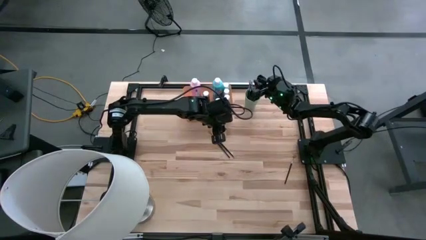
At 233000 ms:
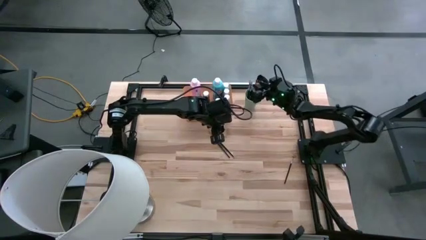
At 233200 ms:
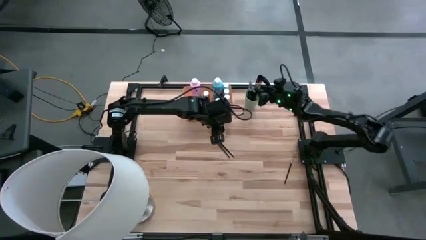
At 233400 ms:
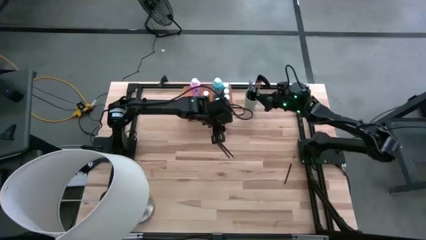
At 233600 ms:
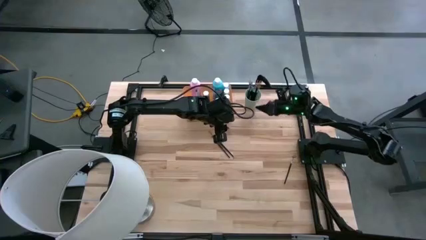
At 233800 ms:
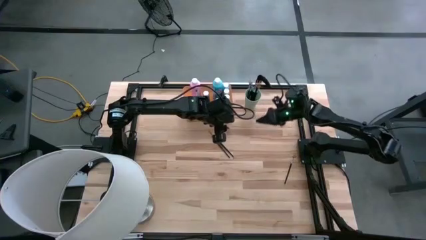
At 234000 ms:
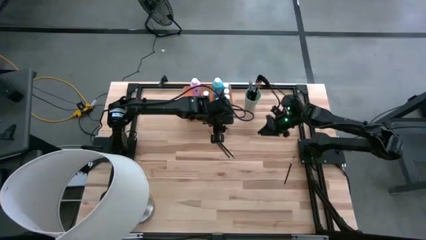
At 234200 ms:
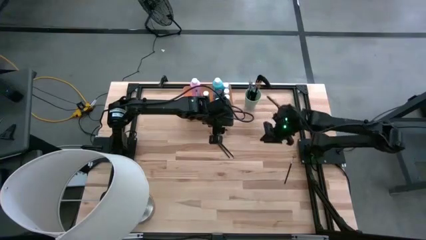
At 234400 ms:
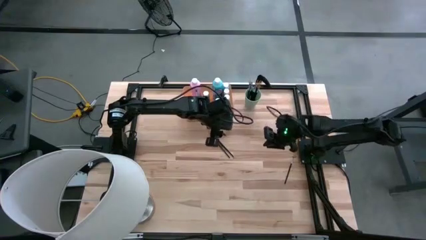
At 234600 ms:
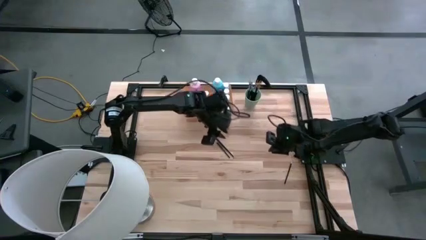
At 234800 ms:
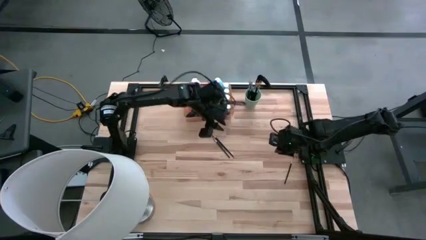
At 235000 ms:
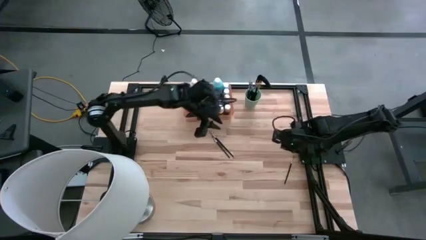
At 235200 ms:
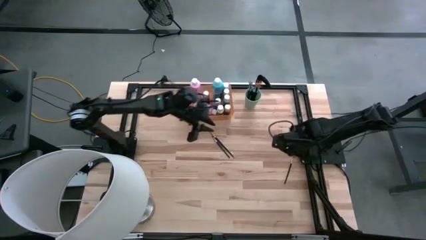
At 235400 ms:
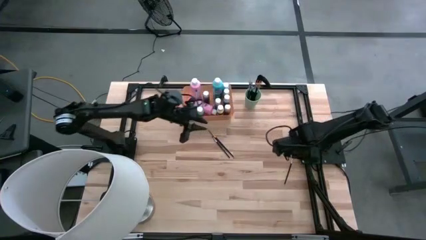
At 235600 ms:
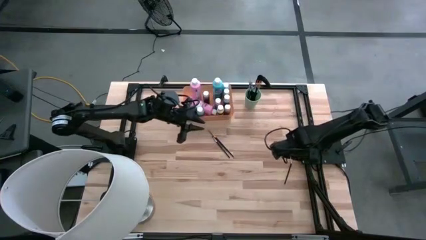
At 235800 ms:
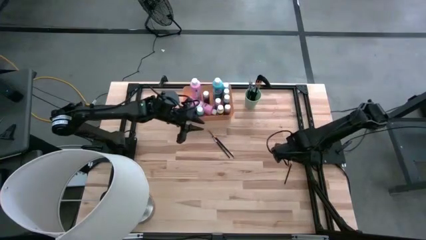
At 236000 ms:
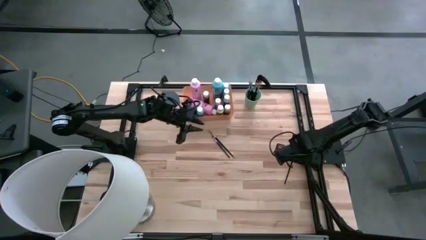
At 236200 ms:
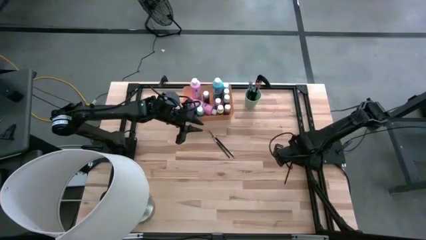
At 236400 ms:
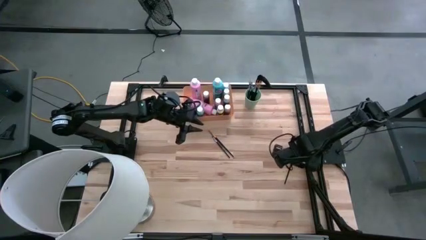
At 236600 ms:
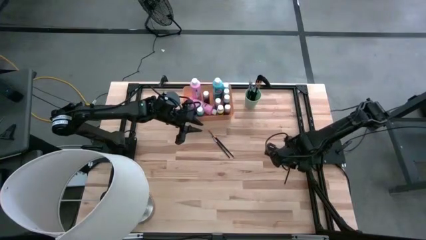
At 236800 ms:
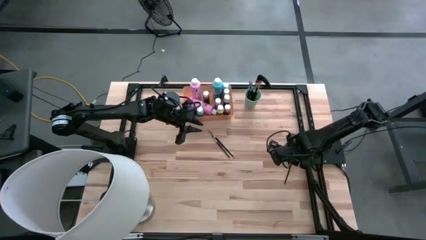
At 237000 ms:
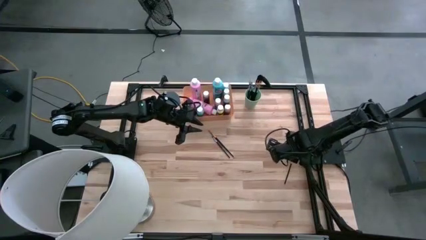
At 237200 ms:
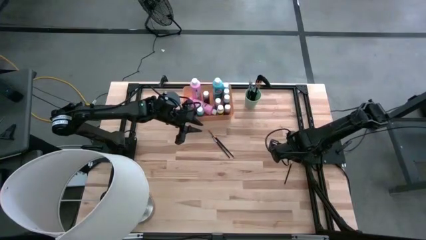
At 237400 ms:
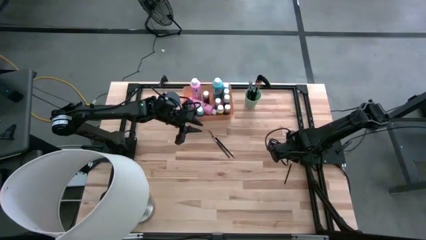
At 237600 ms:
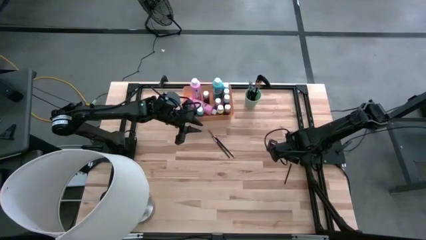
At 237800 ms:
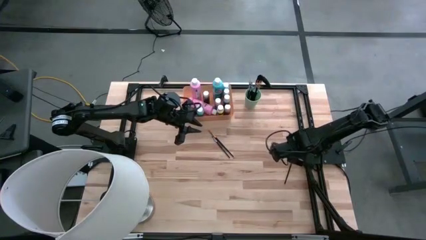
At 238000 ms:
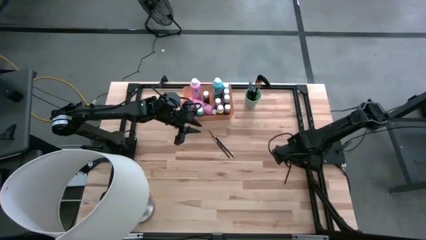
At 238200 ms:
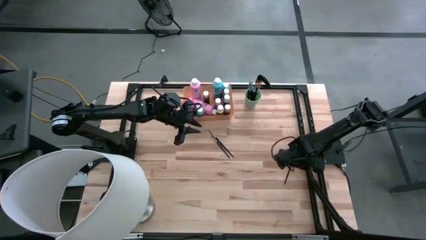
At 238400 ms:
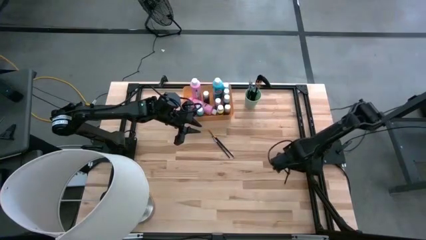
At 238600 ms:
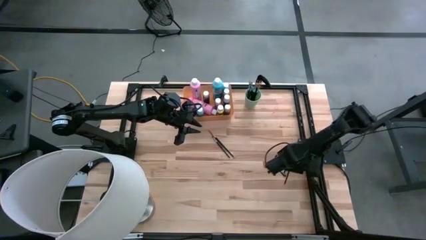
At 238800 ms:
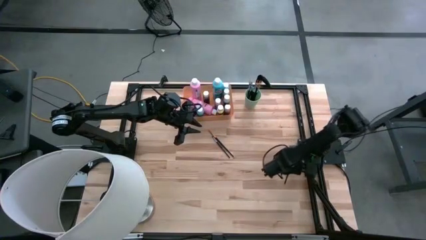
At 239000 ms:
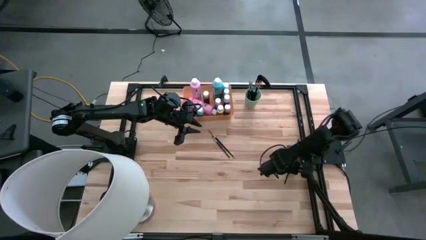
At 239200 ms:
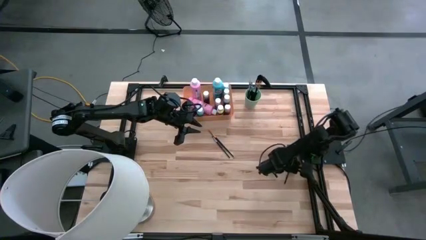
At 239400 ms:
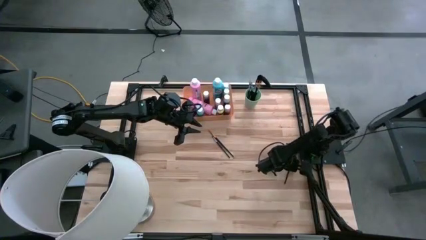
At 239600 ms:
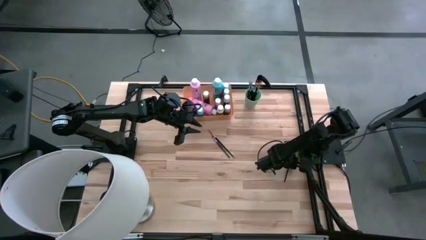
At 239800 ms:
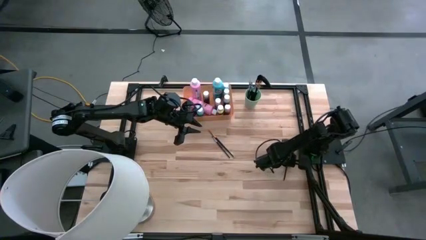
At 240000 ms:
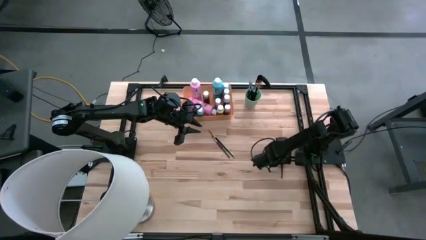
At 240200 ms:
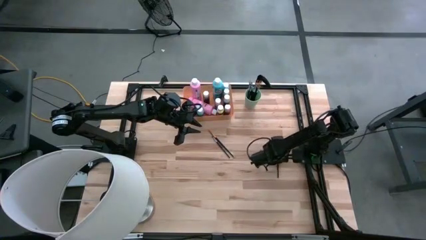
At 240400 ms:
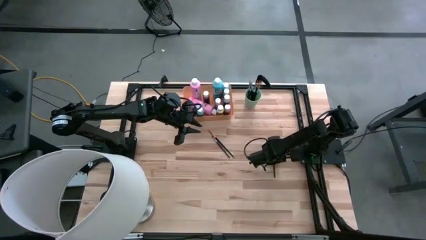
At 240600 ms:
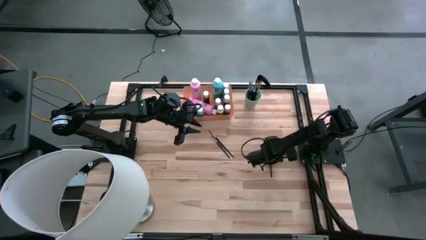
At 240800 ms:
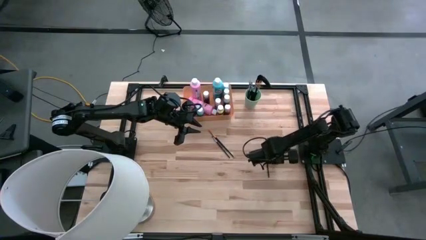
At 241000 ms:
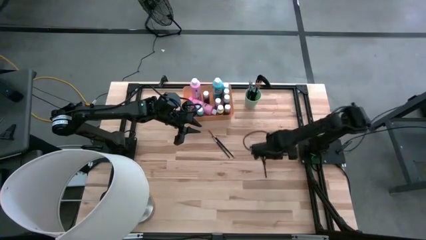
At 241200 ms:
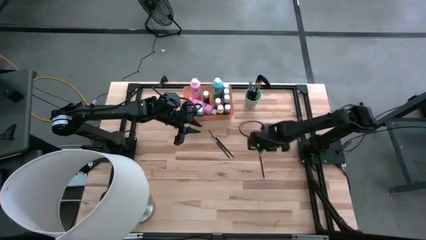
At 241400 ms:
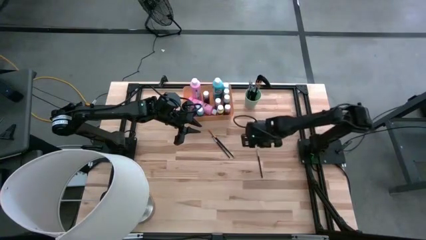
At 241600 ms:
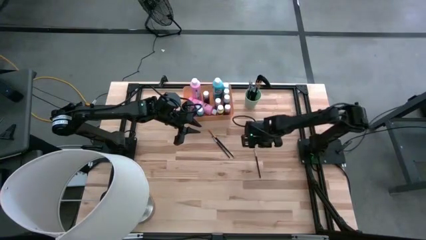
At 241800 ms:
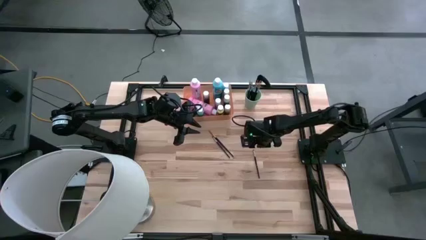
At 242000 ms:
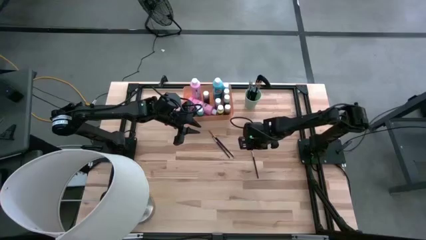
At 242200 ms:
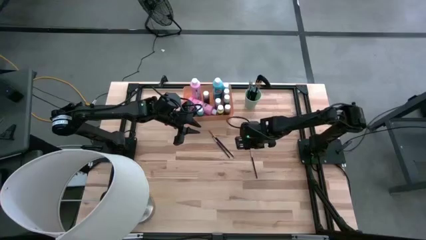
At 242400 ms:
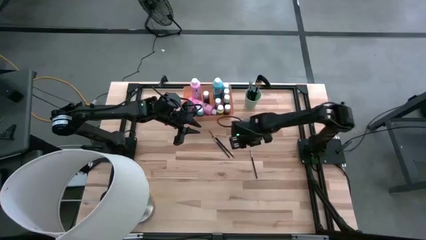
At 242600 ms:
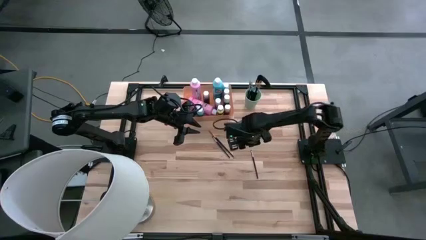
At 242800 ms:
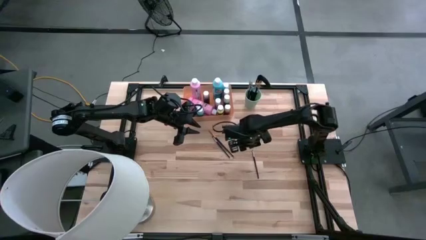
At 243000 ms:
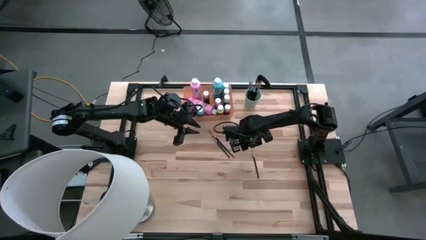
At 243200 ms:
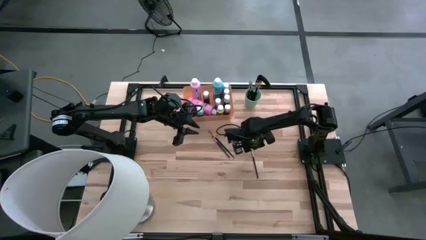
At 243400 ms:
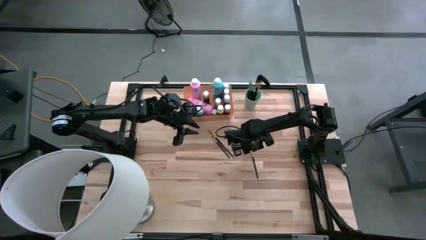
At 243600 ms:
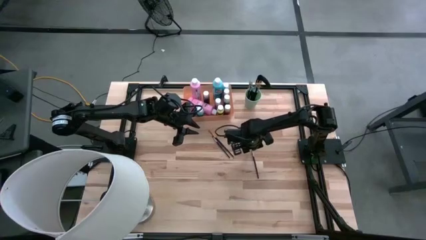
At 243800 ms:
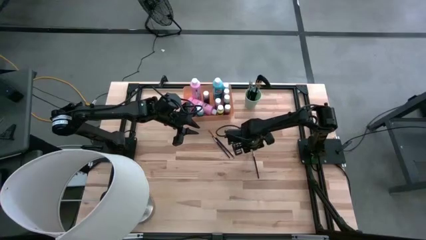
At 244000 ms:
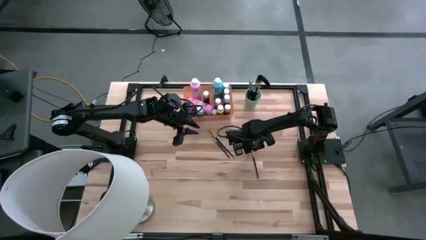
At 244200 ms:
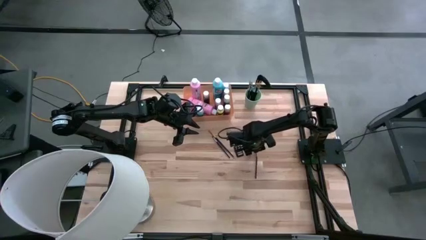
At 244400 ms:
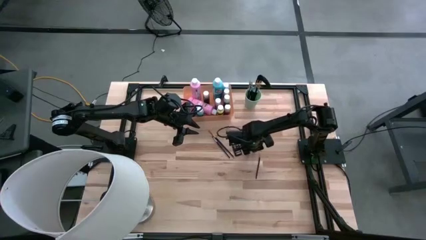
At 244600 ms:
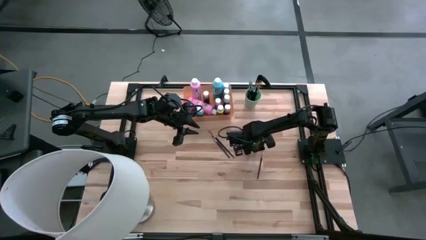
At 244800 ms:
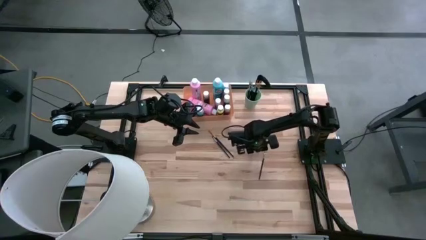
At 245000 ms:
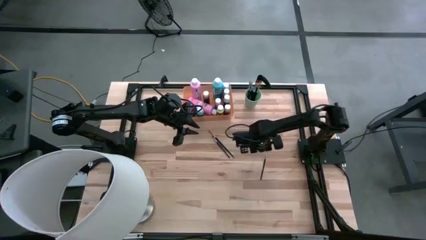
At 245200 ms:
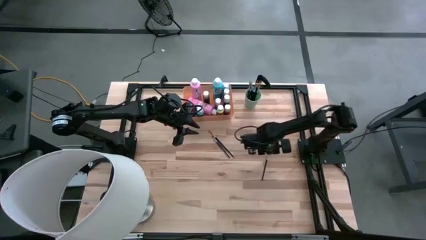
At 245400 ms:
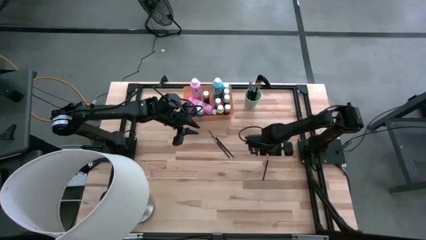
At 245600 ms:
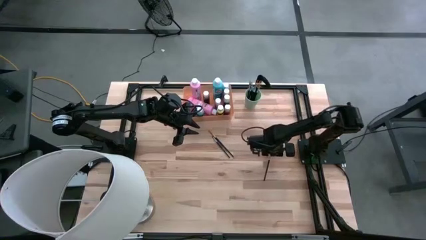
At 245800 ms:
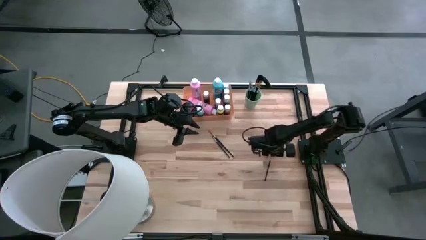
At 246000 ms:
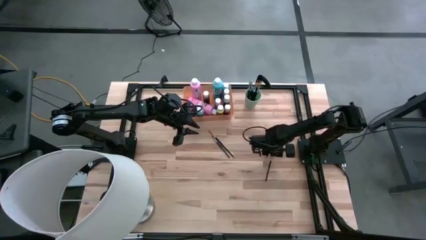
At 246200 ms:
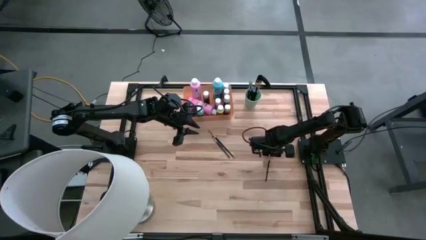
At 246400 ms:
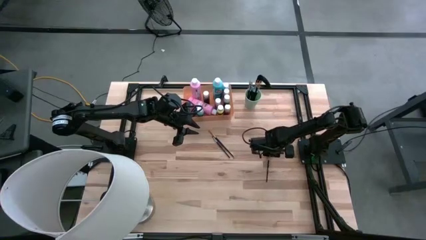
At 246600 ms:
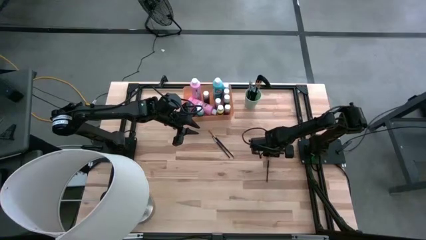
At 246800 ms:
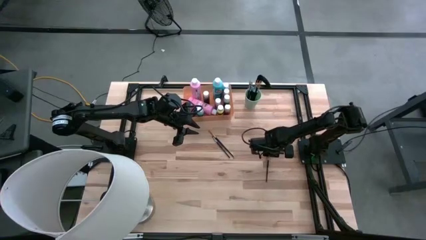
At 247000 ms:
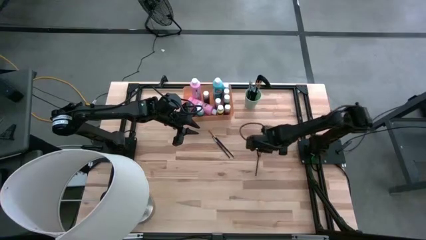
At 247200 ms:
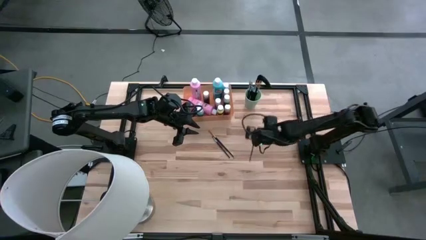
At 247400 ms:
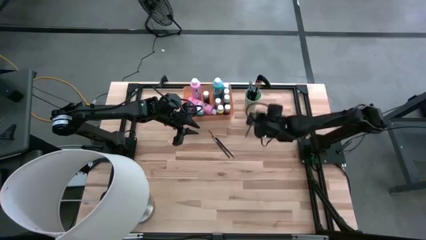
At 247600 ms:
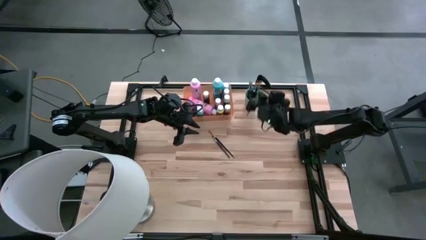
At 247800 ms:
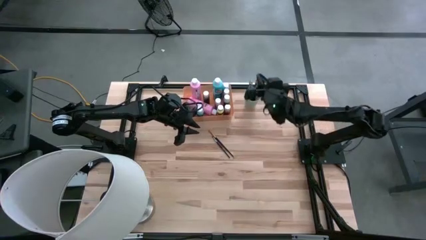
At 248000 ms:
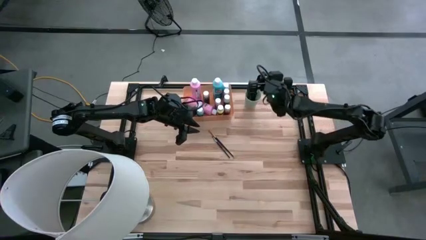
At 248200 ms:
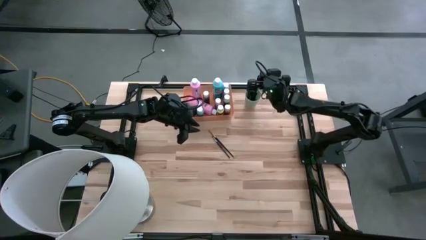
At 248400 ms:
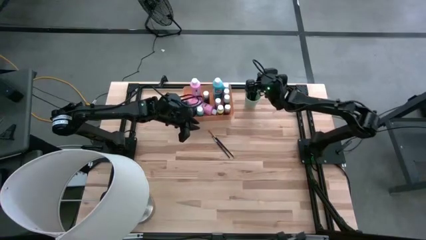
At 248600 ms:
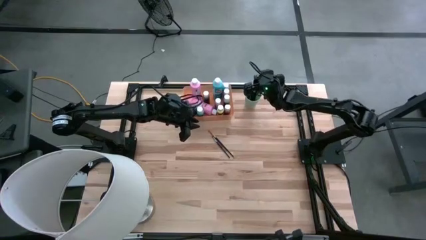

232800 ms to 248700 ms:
Task: Pick & Place Paint Supplies
Put the silver paint brush into the green cup
